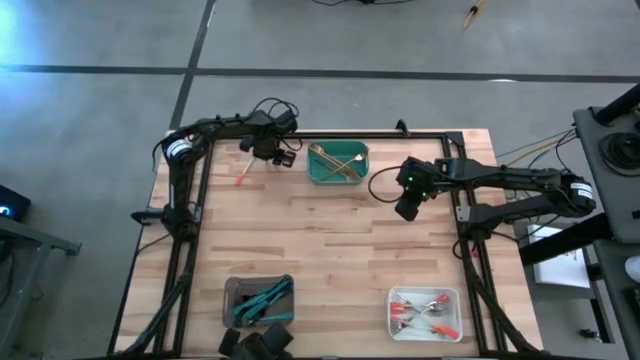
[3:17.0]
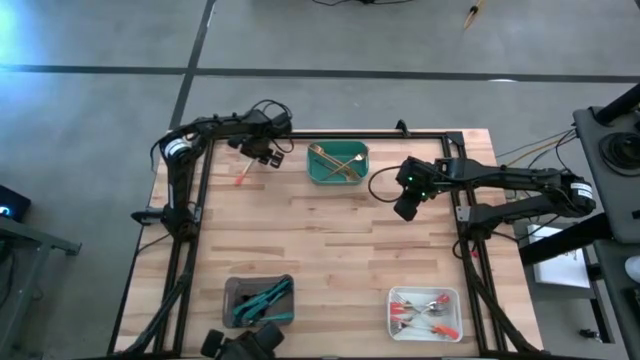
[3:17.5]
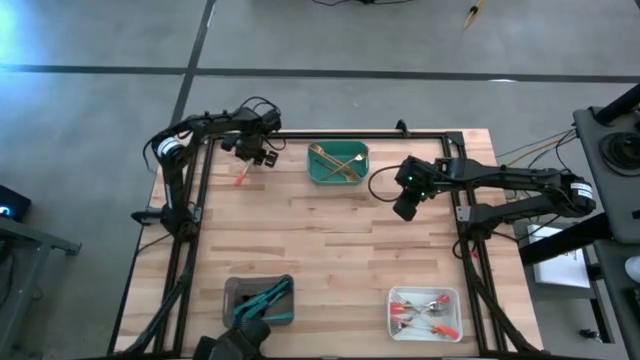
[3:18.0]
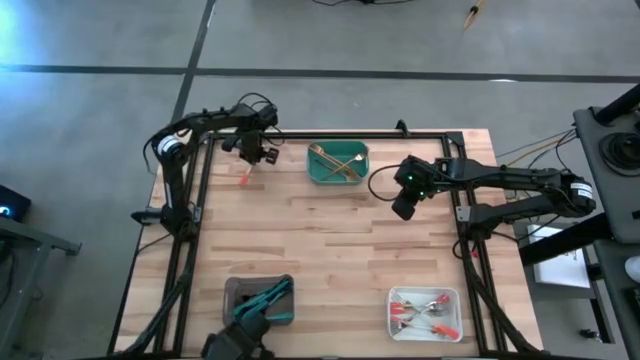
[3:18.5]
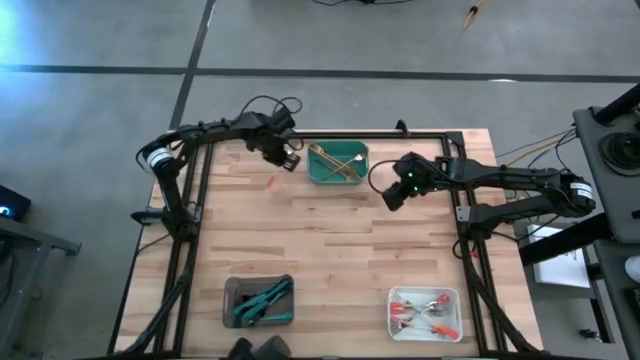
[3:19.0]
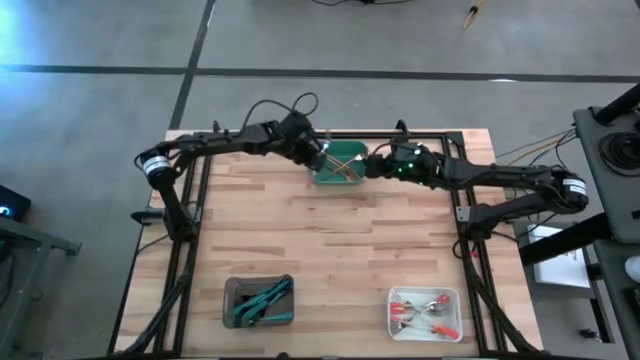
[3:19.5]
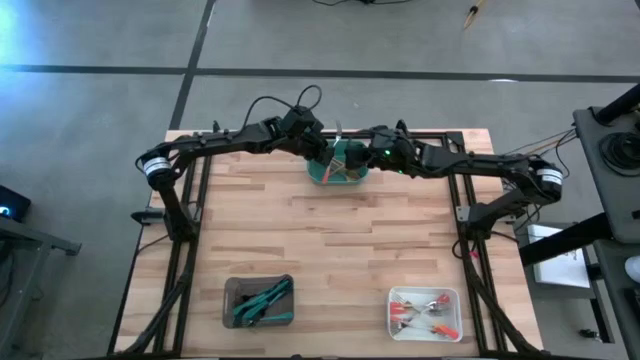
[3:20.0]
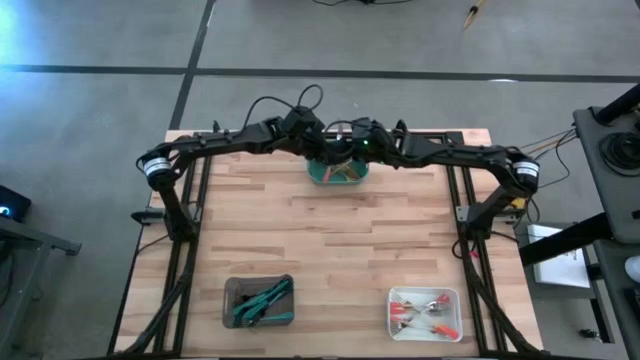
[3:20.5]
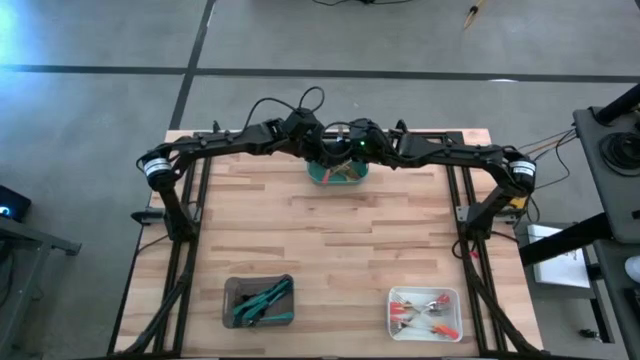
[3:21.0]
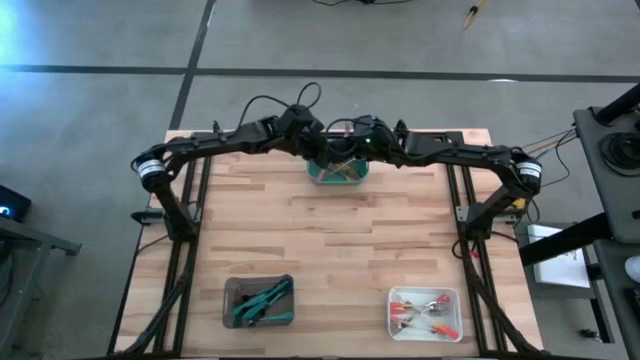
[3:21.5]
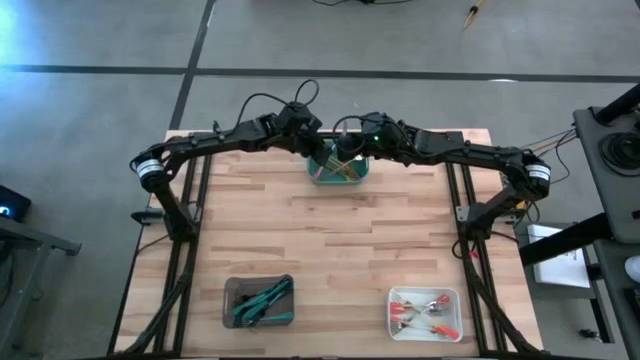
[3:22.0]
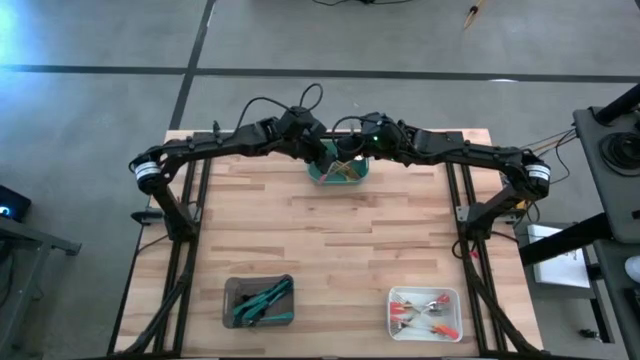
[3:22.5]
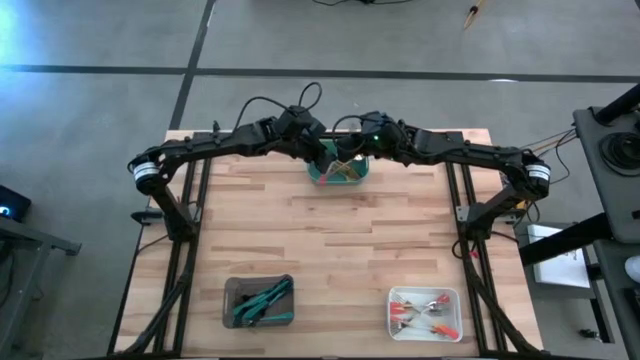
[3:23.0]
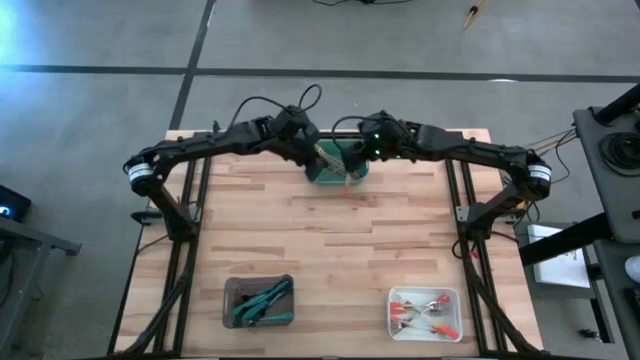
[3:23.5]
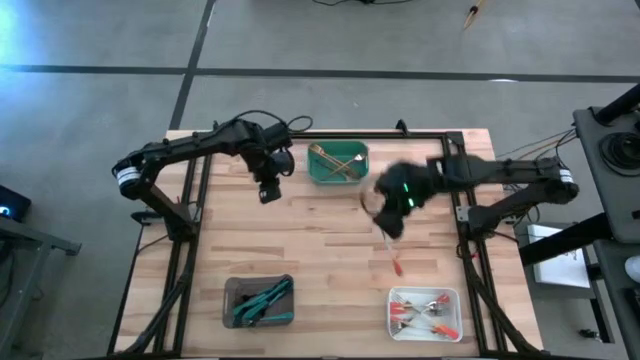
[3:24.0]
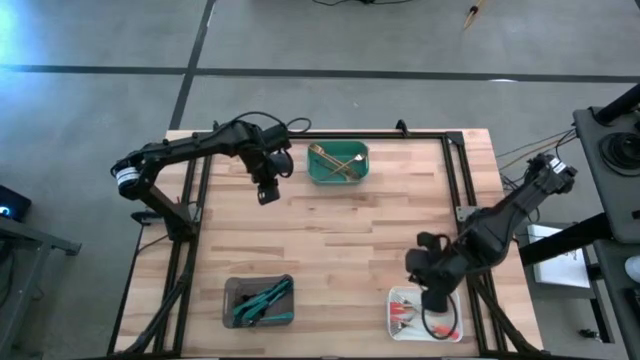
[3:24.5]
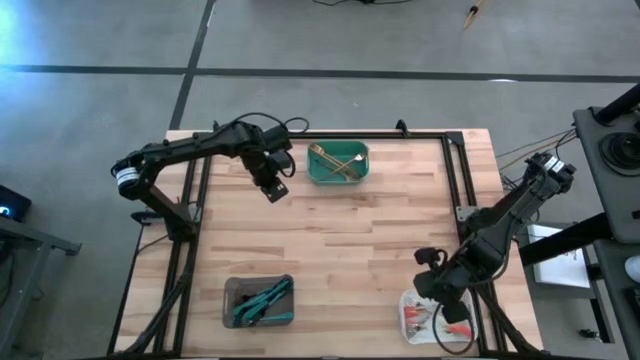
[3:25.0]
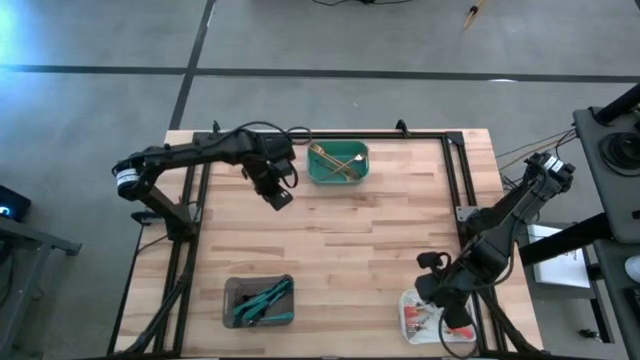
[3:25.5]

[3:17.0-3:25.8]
Task: Sort silverware by color (type)
Put the orange fork into the white bin

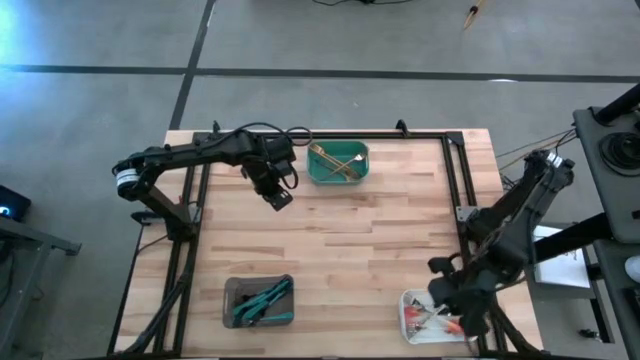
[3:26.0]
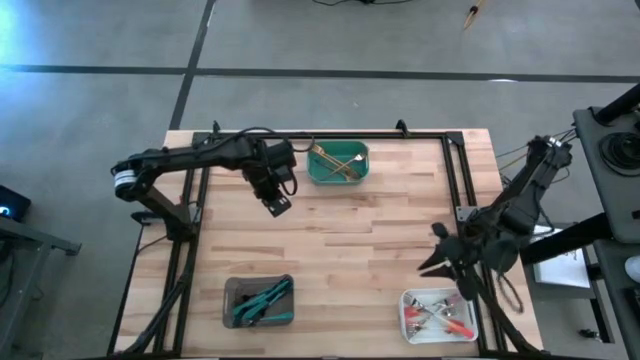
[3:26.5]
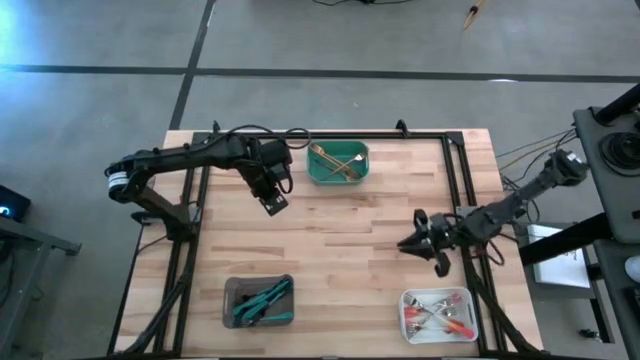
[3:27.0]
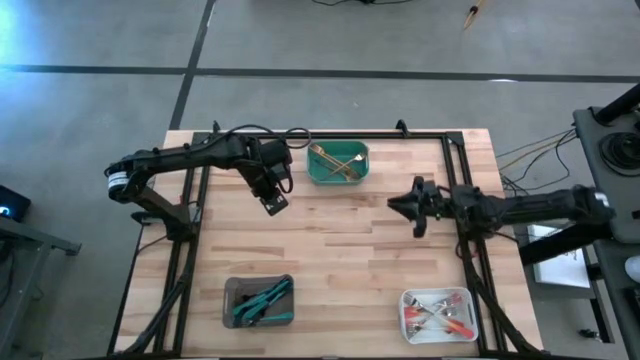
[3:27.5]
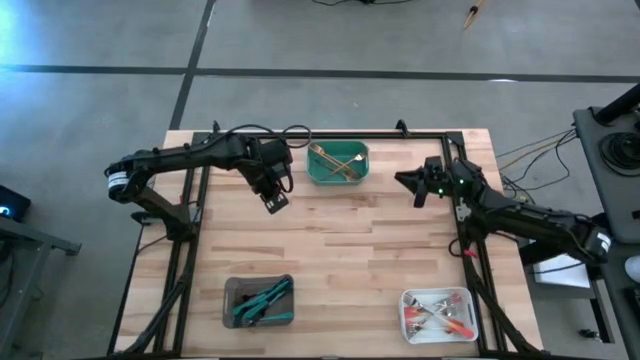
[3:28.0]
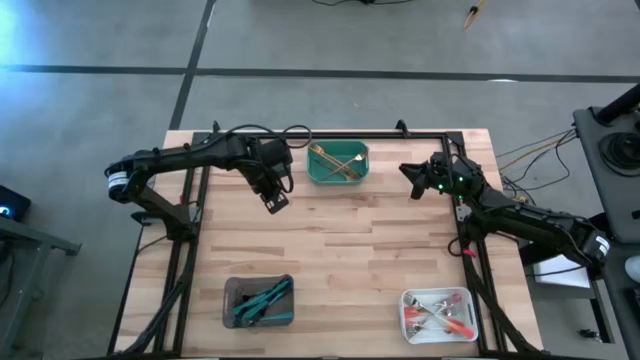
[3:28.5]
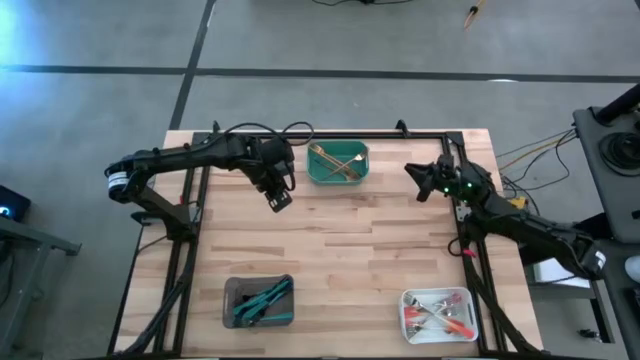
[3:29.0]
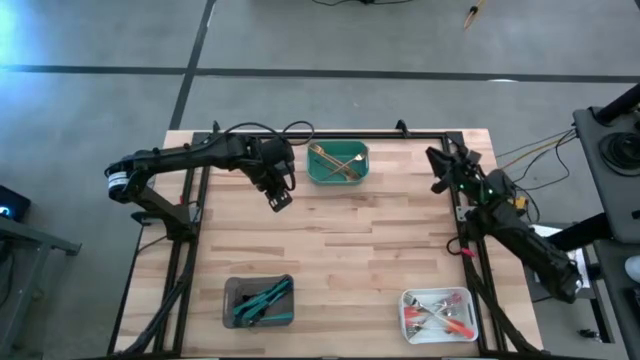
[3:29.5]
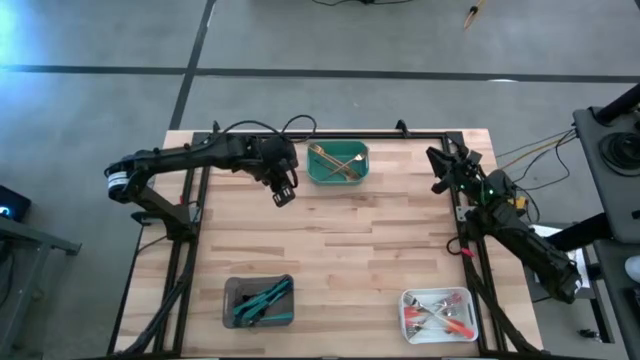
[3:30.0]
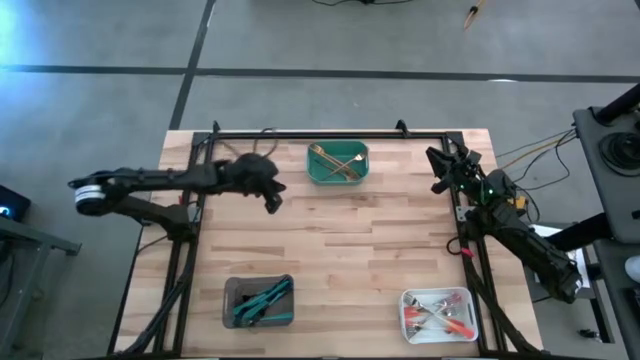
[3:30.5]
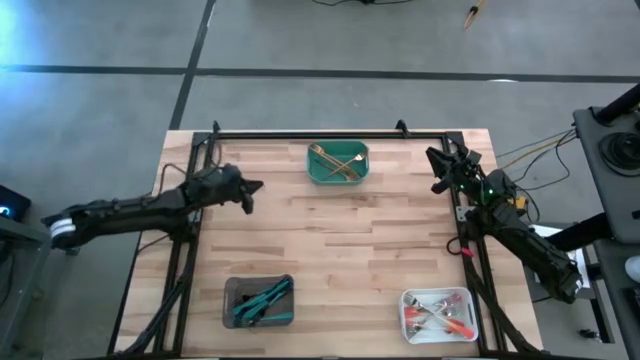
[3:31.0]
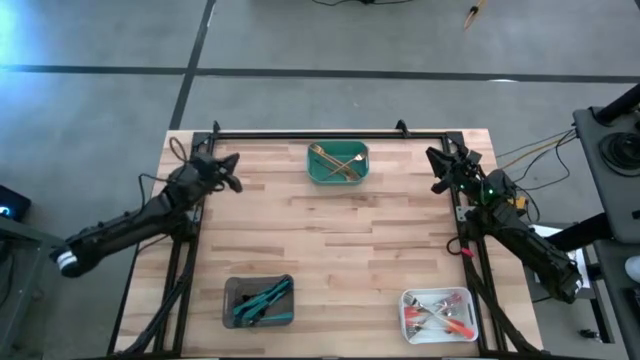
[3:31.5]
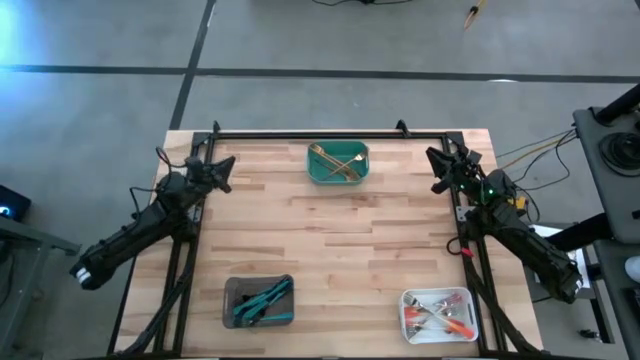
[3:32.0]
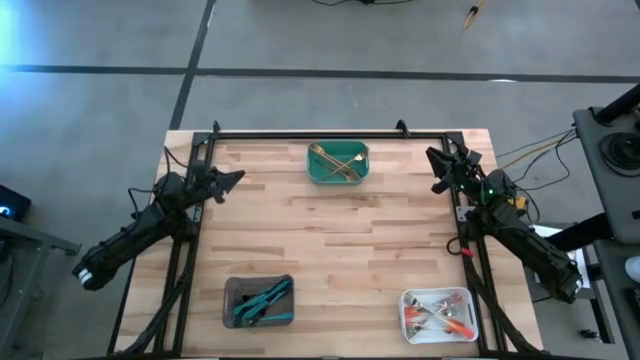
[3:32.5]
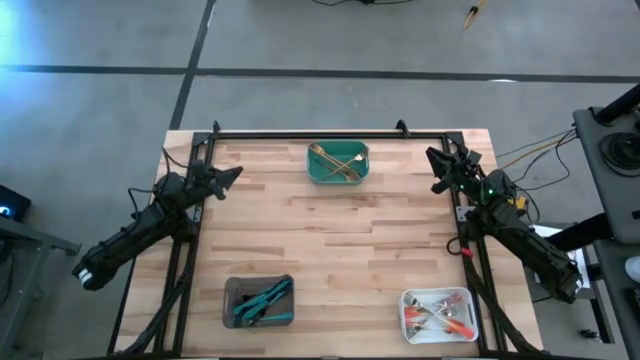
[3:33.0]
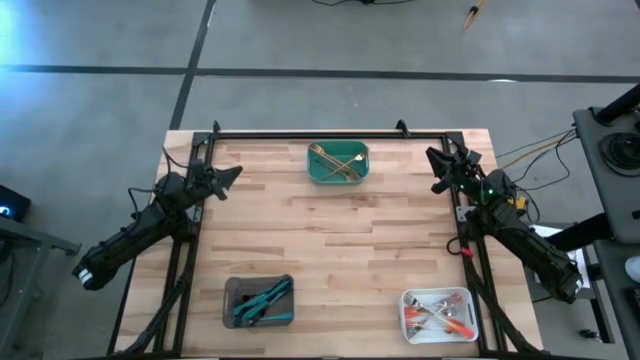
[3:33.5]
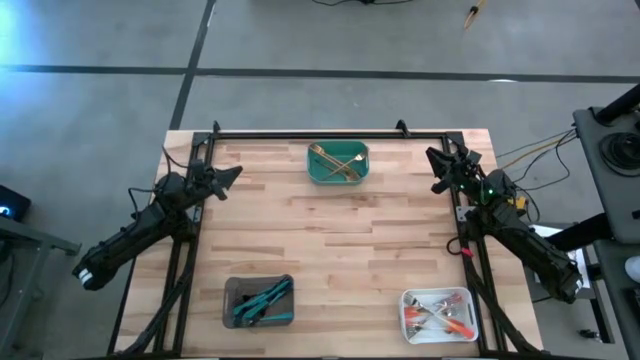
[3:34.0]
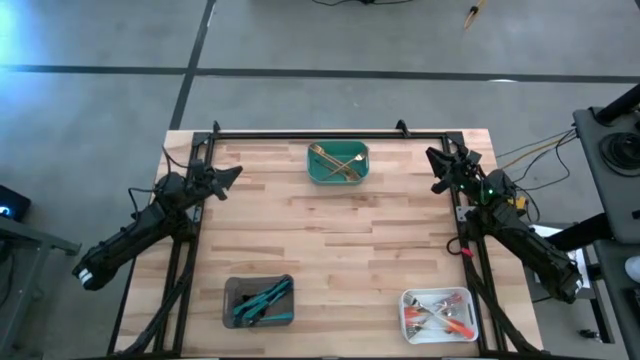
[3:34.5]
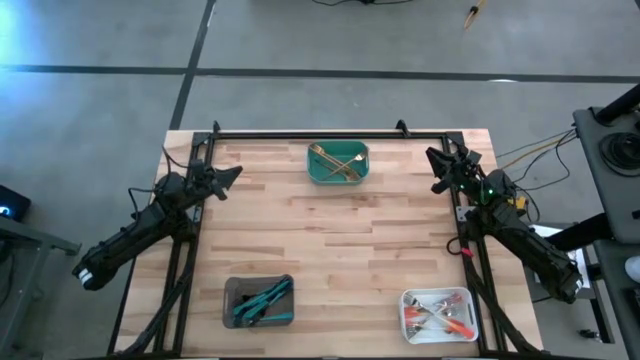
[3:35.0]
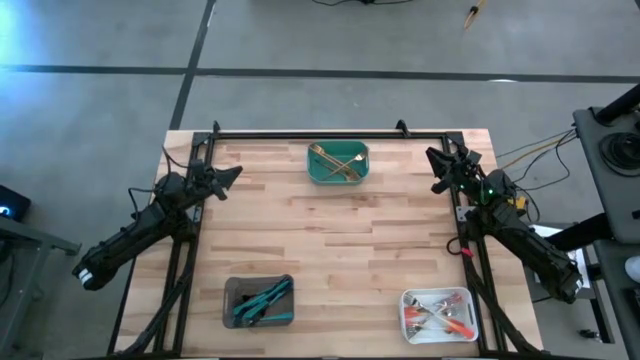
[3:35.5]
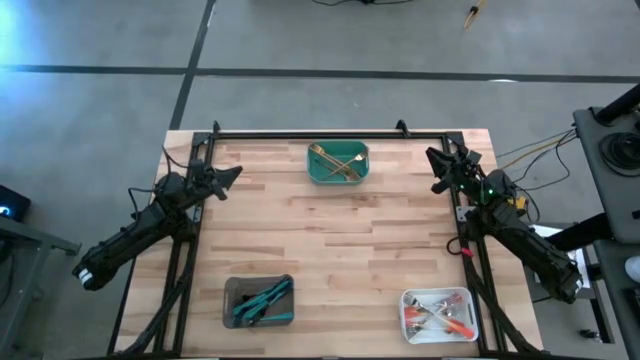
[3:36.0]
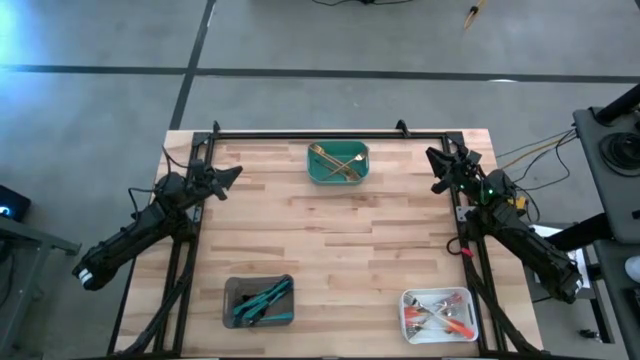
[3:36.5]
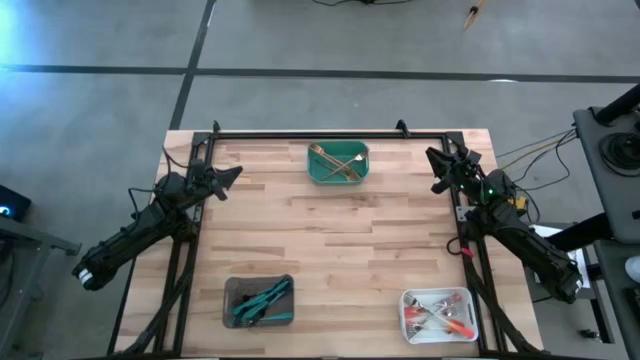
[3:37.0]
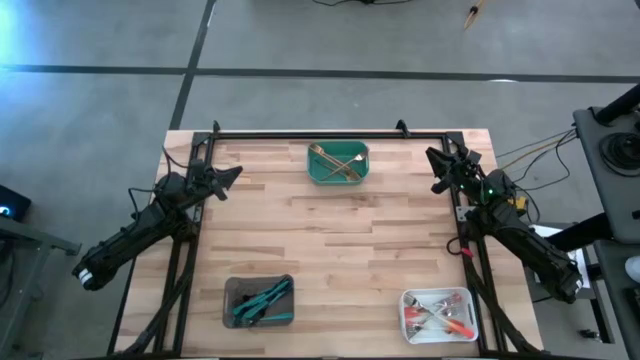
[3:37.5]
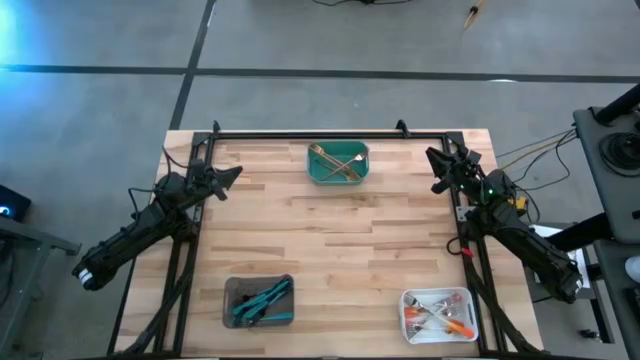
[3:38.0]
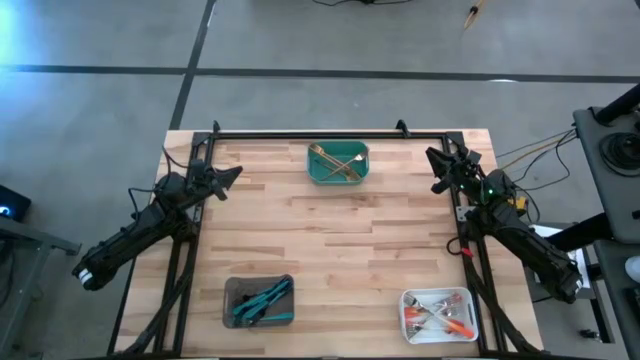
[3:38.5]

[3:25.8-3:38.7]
Return to Home Position
